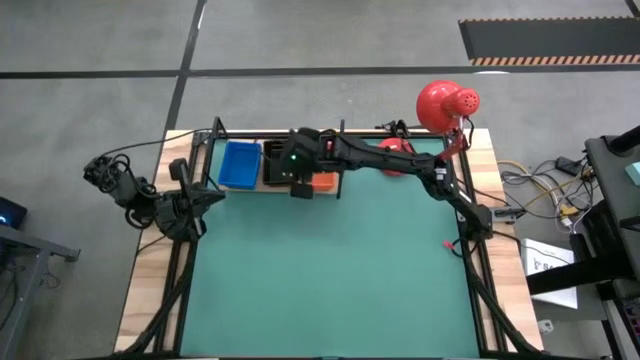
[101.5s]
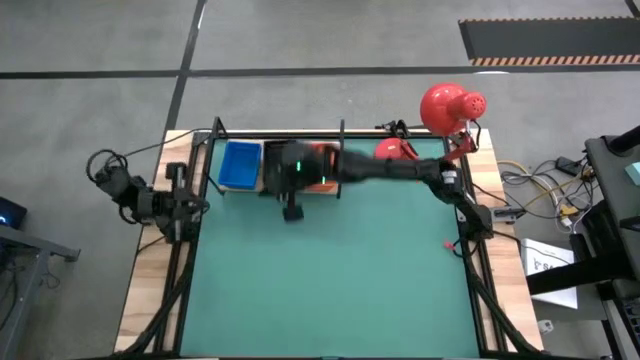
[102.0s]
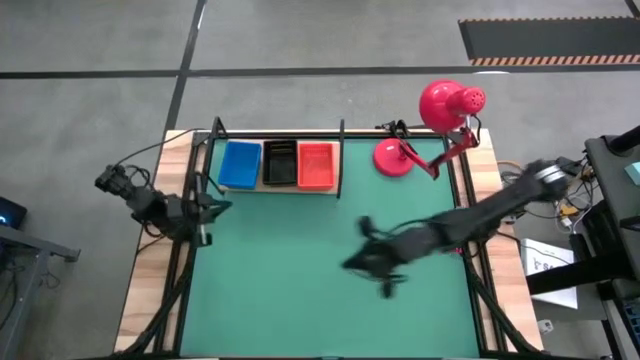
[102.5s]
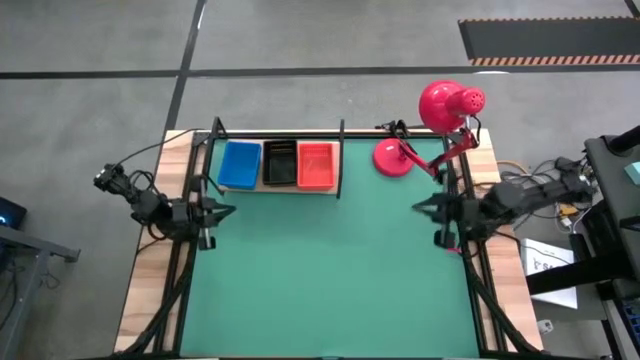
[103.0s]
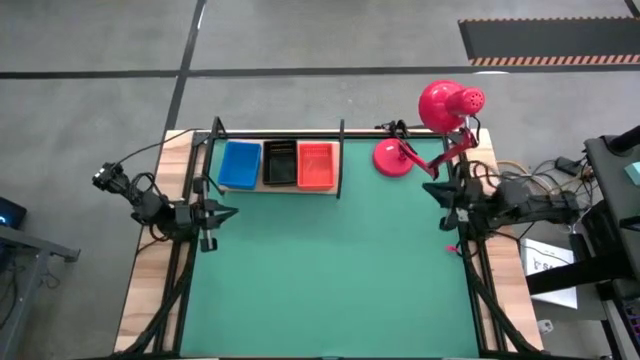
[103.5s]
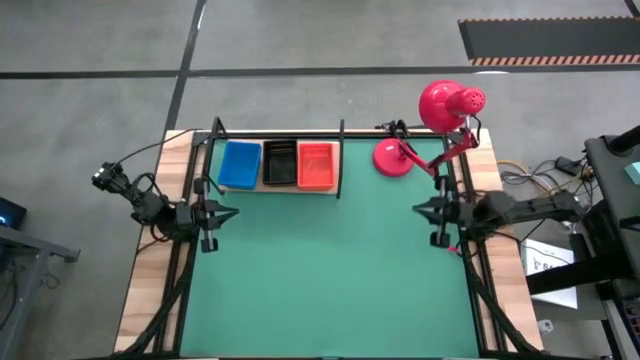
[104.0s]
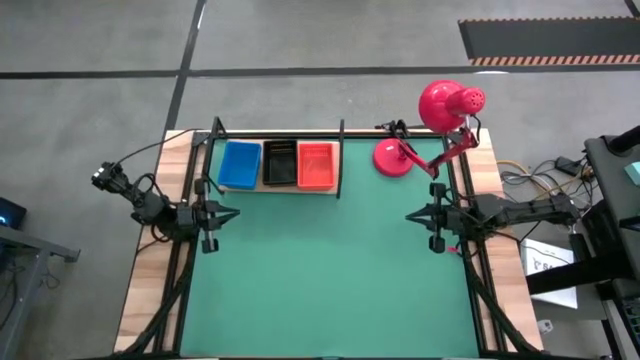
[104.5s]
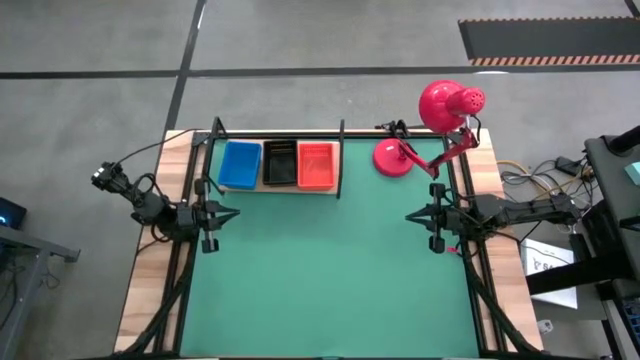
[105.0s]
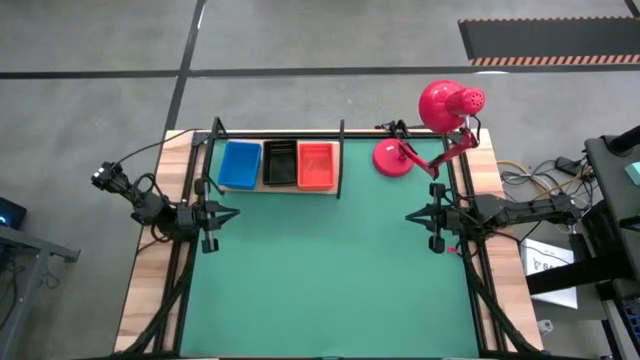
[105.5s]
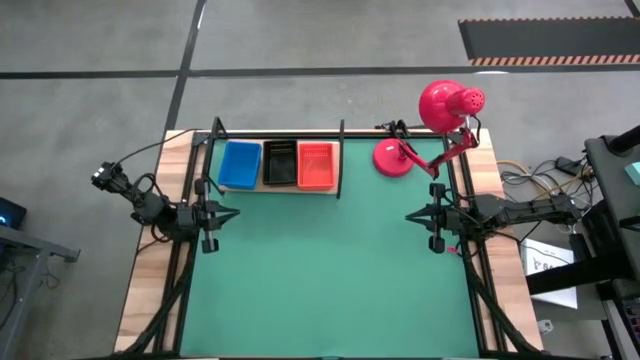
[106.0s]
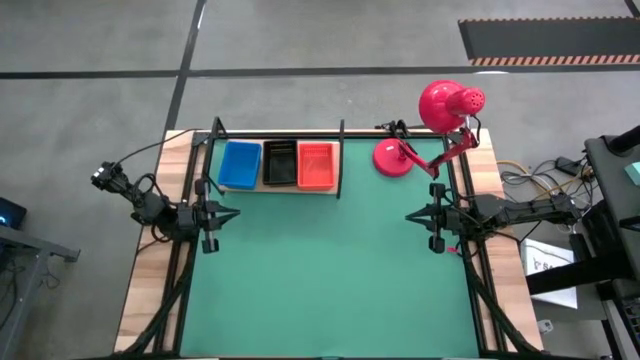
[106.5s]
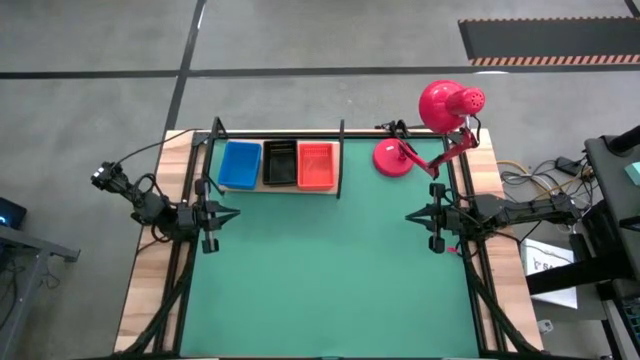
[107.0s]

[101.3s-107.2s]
Task: Stack baskets on shelf by color
Return to Home Position

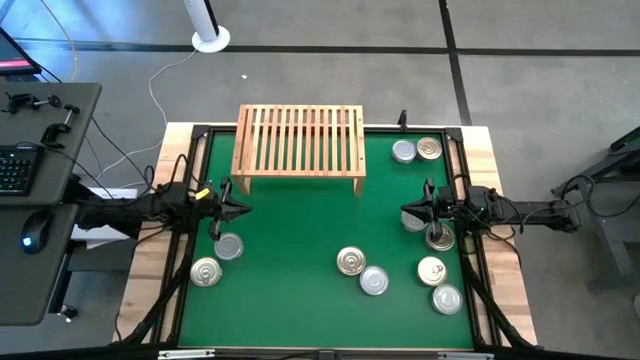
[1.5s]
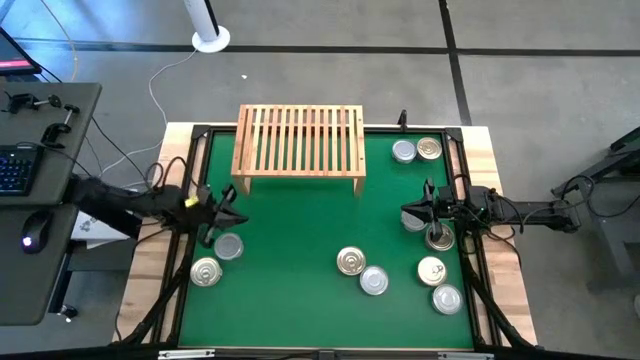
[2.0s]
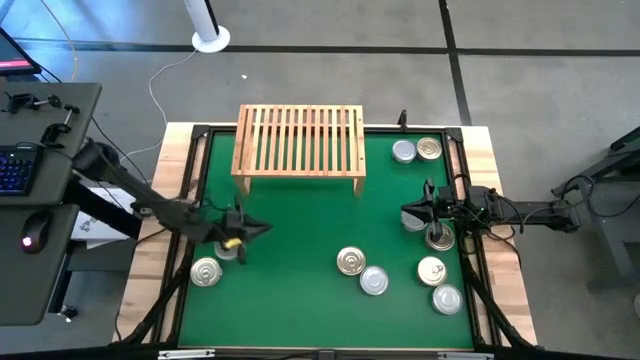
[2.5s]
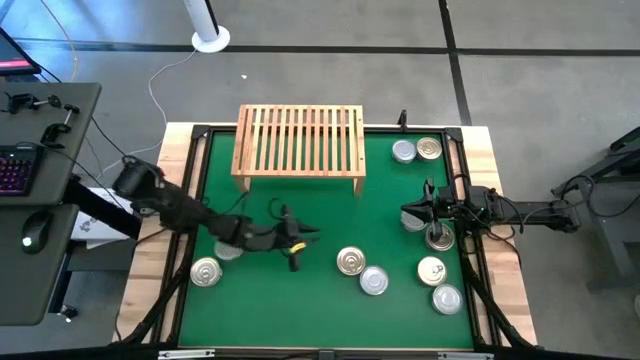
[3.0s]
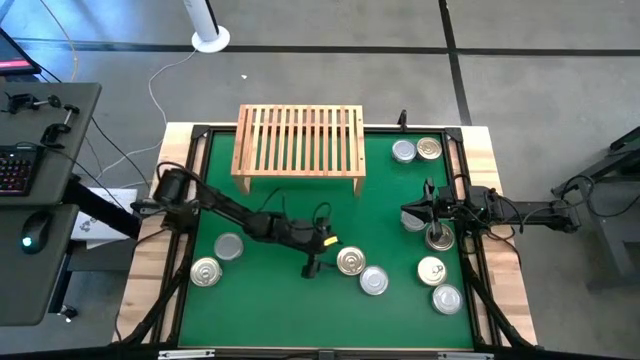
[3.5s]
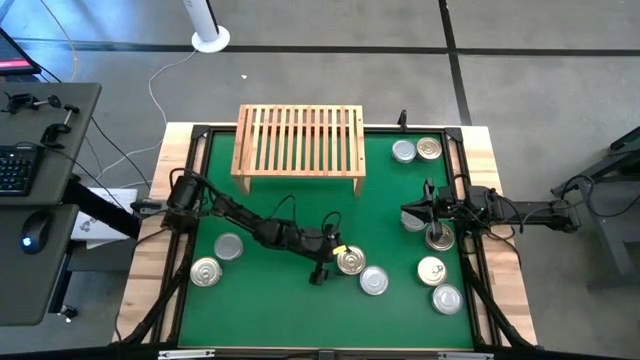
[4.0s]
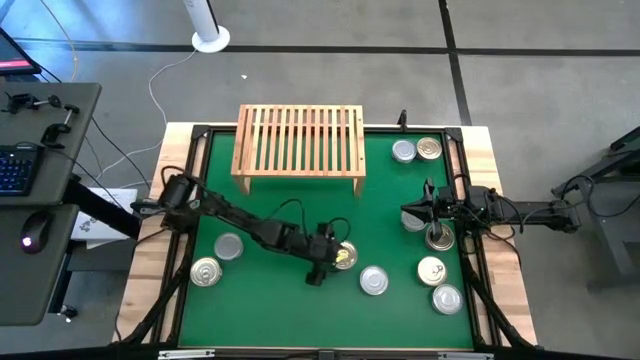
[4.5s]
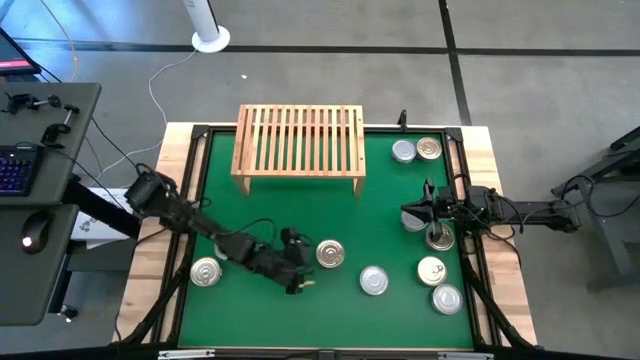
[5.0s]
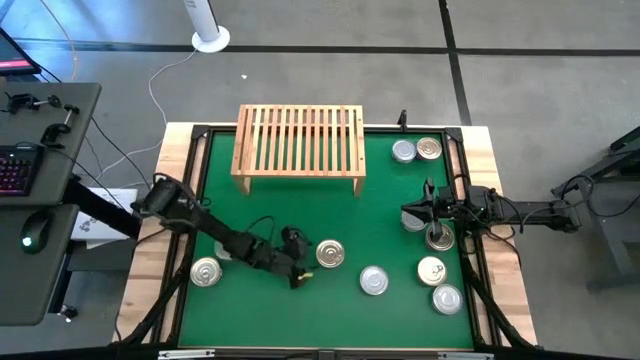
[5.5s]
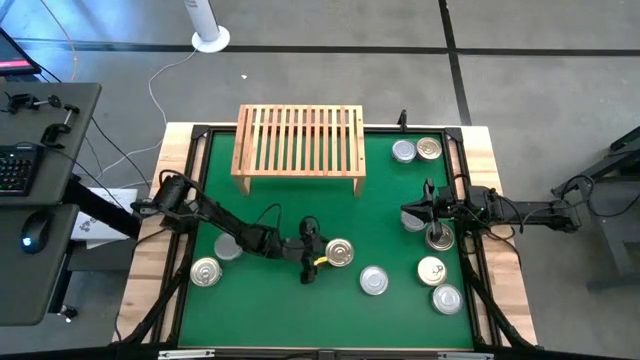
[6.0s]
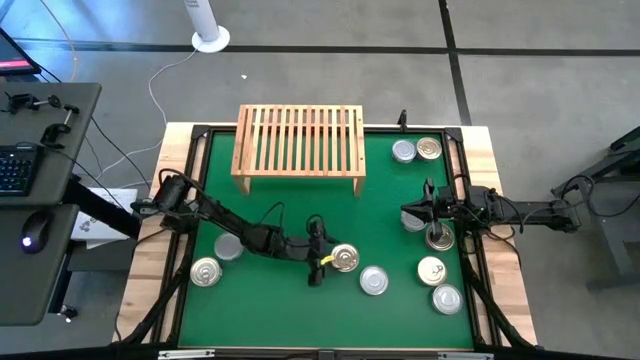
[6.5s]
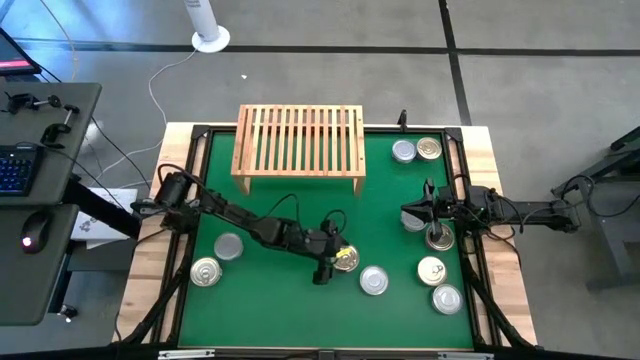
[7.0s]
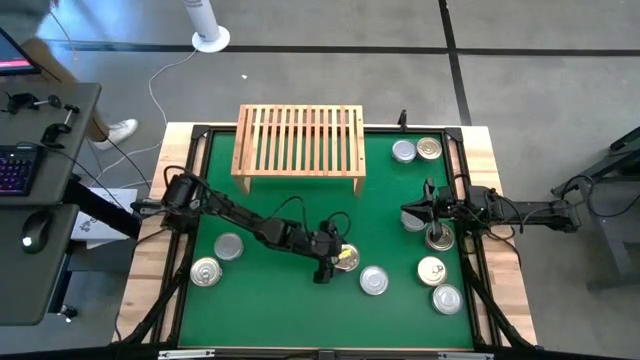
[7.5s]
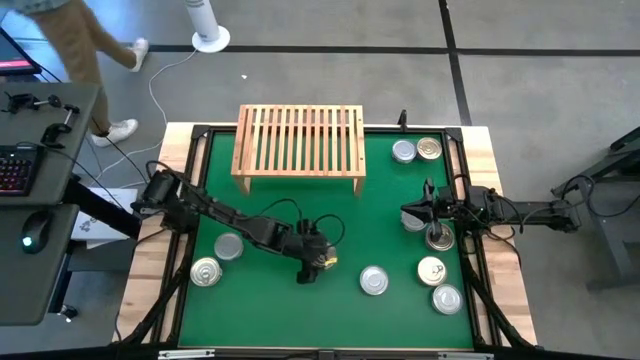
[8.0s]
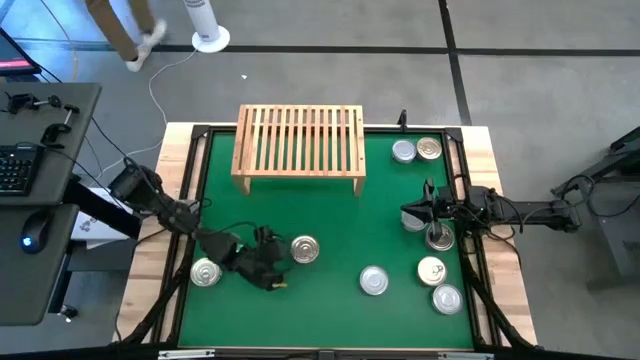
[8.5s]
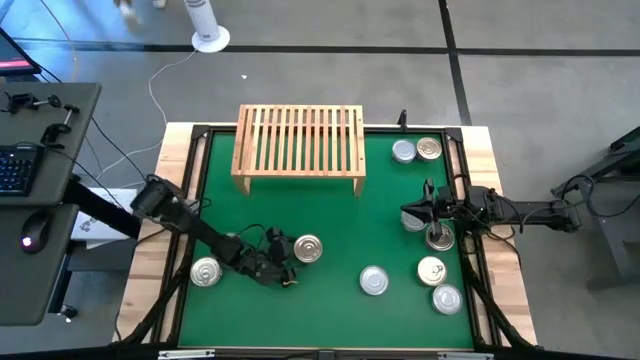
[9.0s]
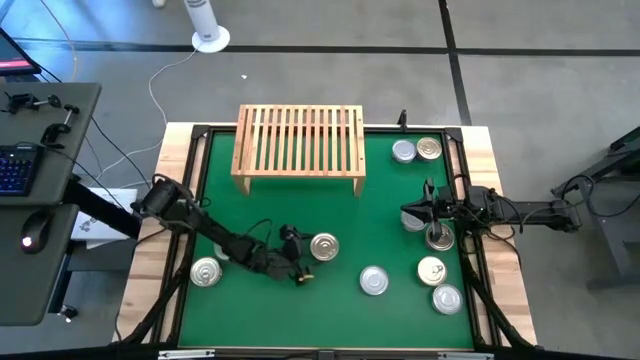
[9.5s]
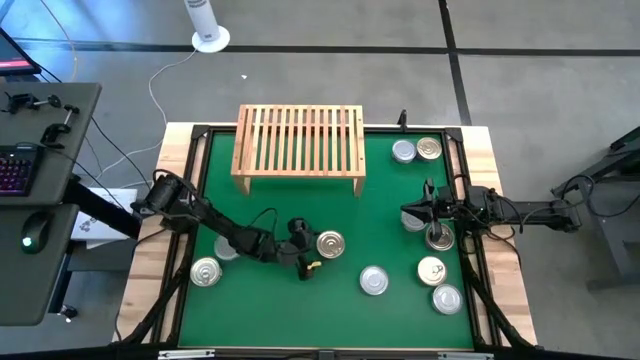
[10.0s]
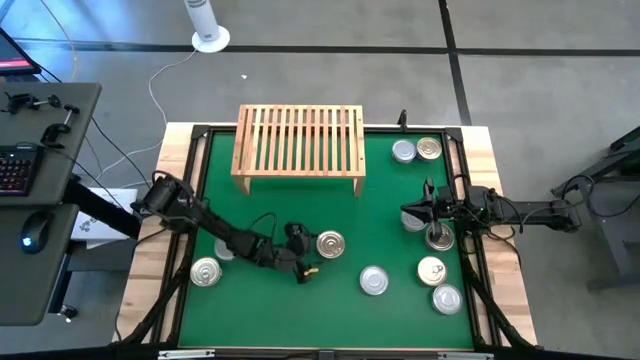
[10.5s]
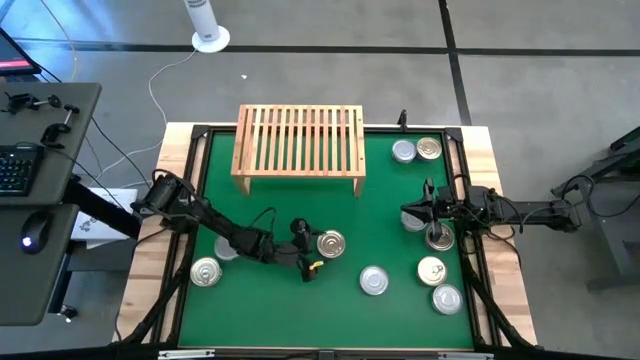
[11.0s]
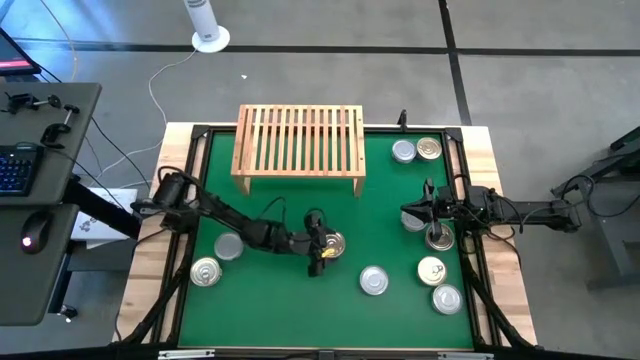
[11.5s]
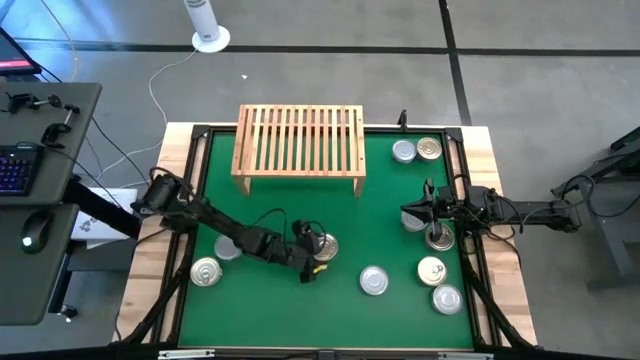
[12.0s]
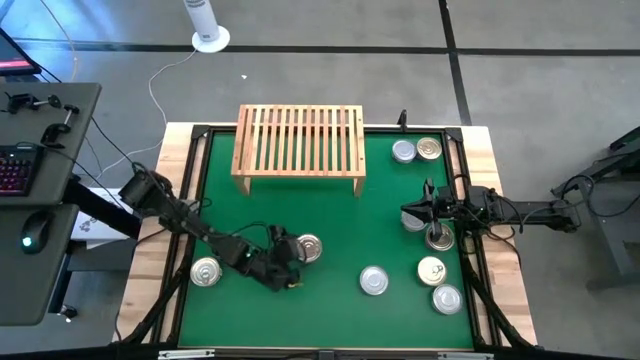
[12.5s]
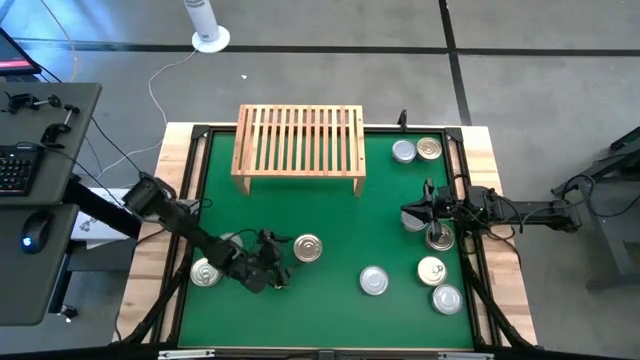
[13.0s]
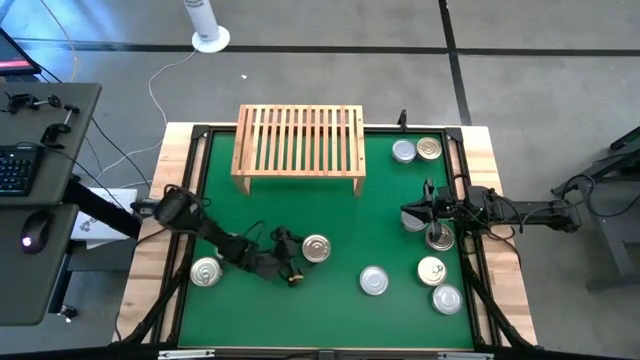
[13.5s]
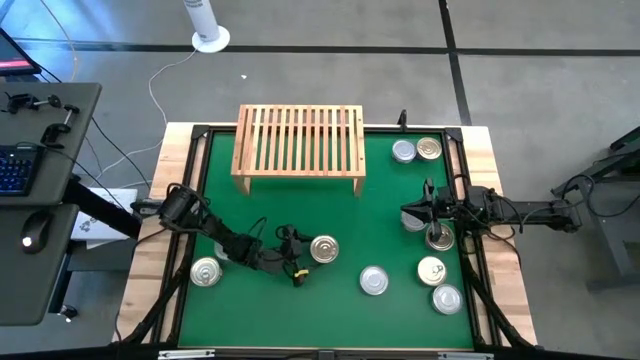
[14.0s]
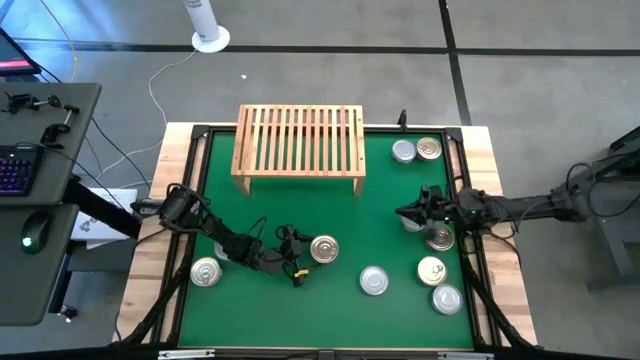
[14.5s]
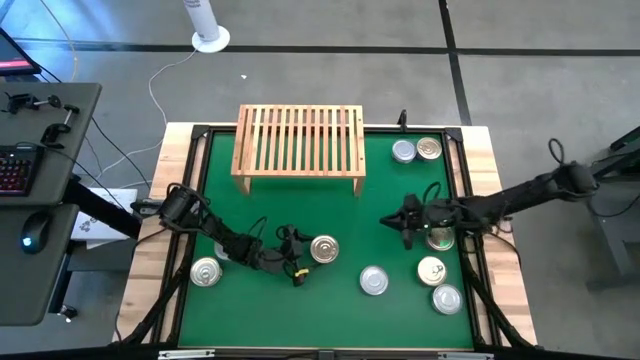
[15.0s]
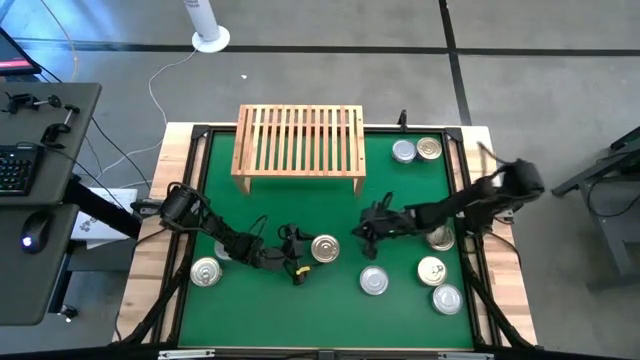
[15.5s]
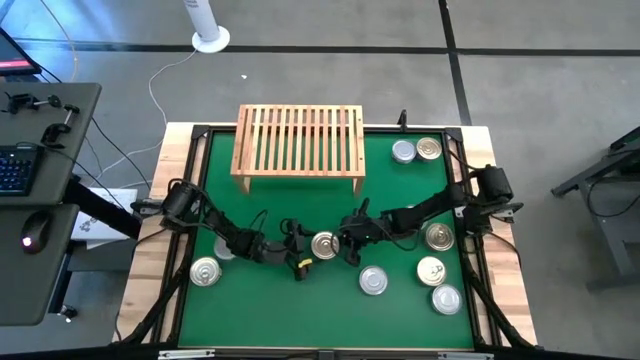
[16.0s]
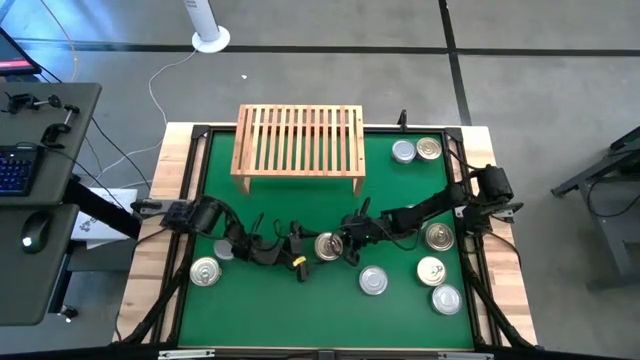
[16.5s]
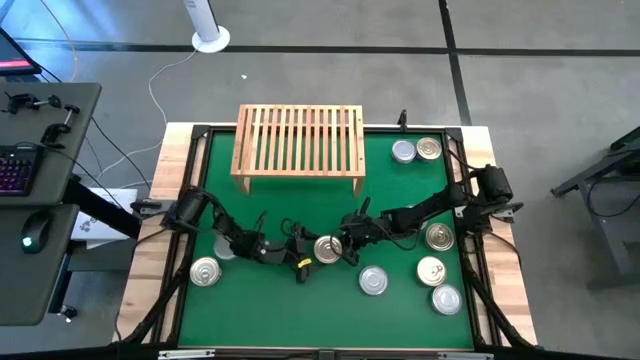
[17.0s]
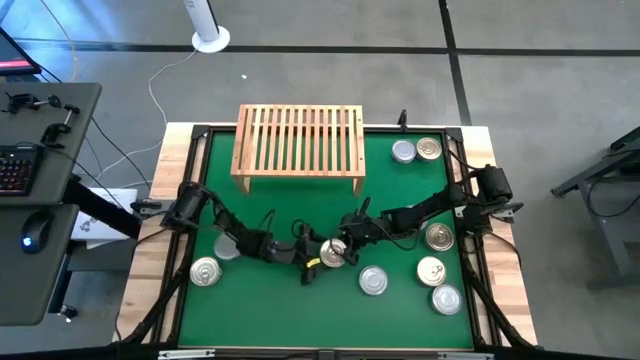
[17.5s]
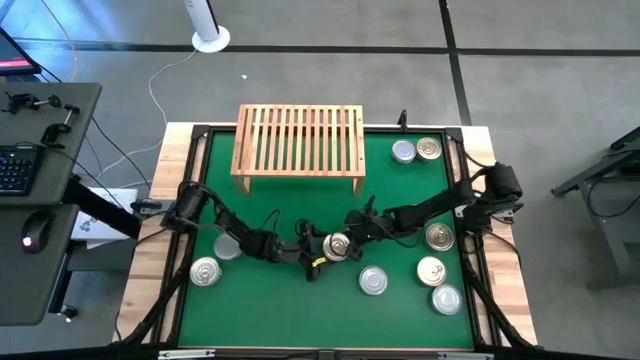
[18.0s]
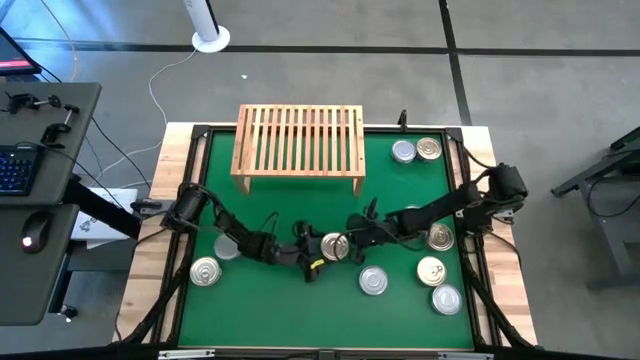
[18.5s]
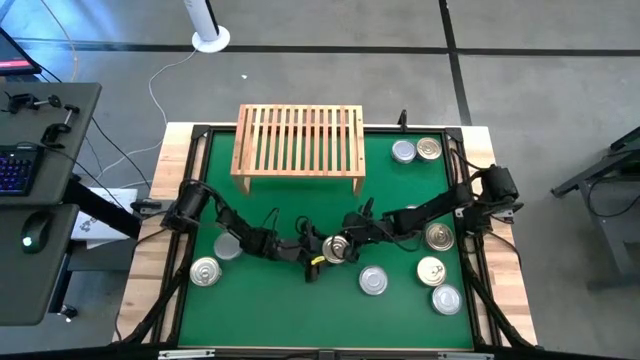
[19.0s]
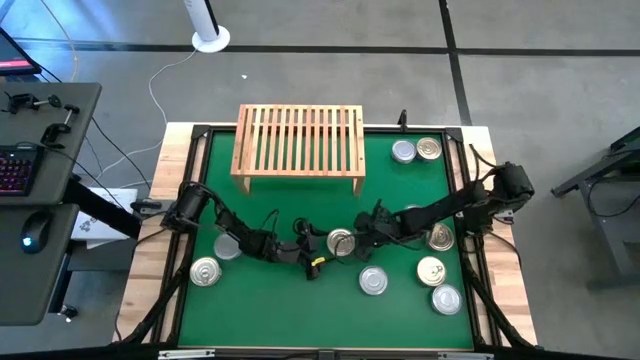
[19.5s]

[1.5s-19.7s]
Task: Stack canned seafood by type on shelf
Put the blue pink tuna can on the shelf
